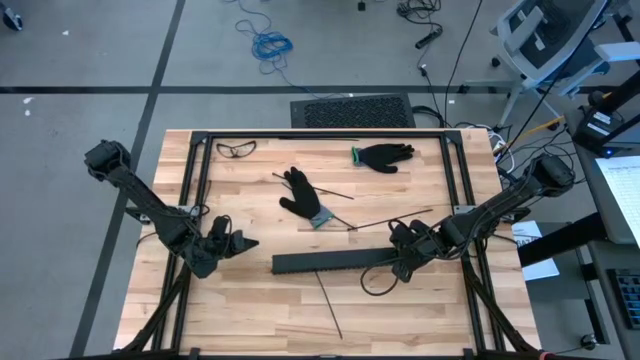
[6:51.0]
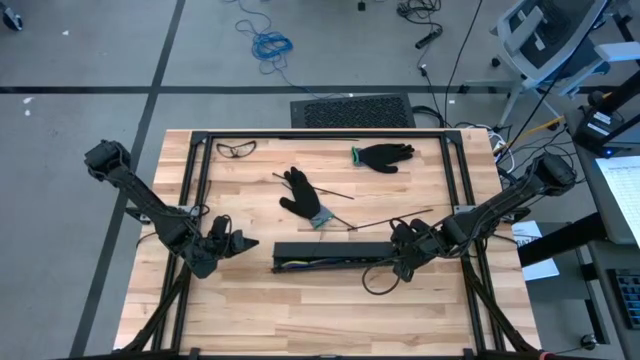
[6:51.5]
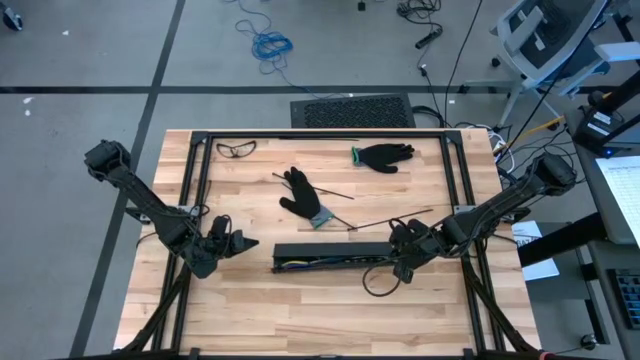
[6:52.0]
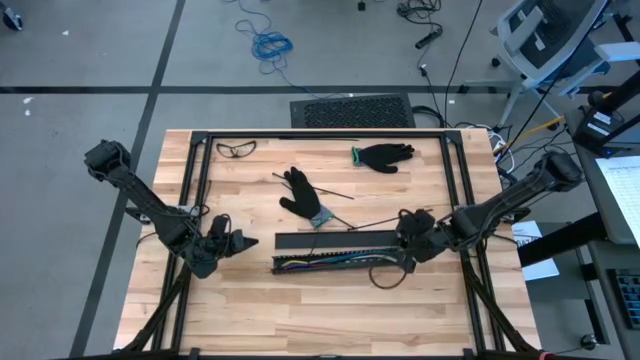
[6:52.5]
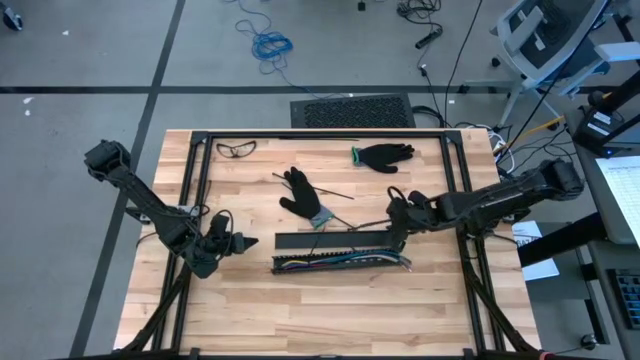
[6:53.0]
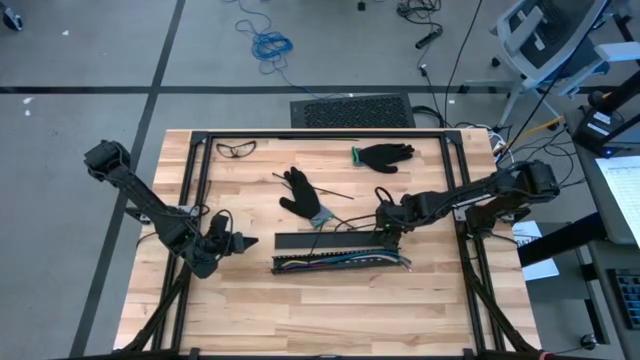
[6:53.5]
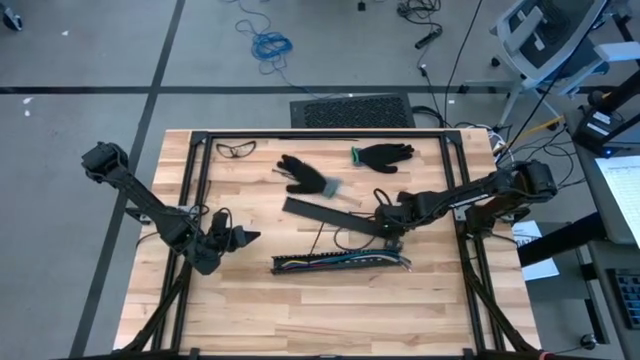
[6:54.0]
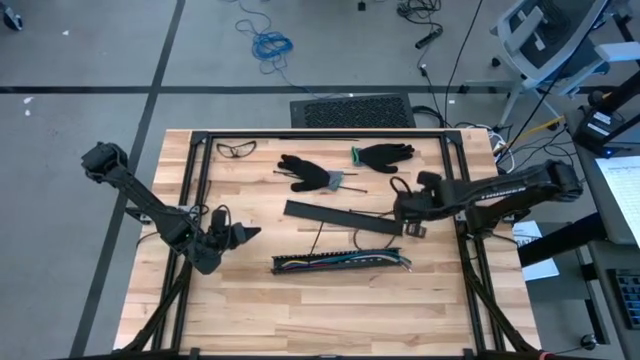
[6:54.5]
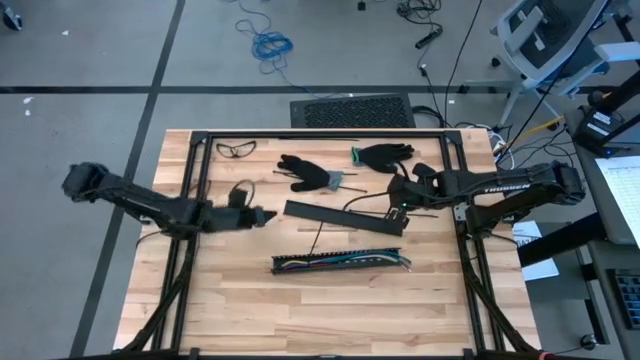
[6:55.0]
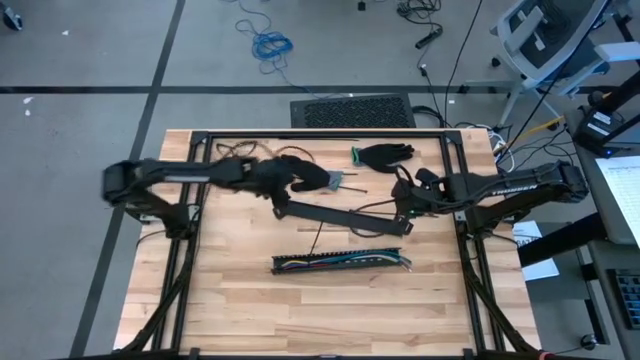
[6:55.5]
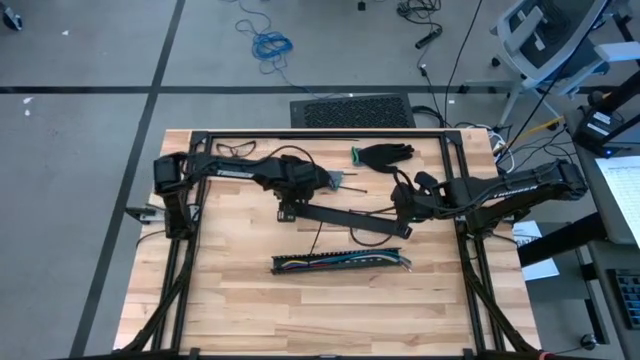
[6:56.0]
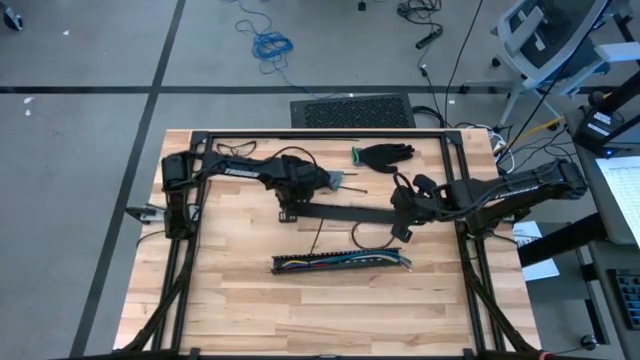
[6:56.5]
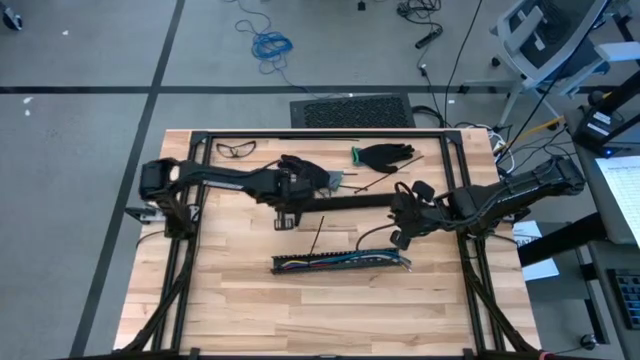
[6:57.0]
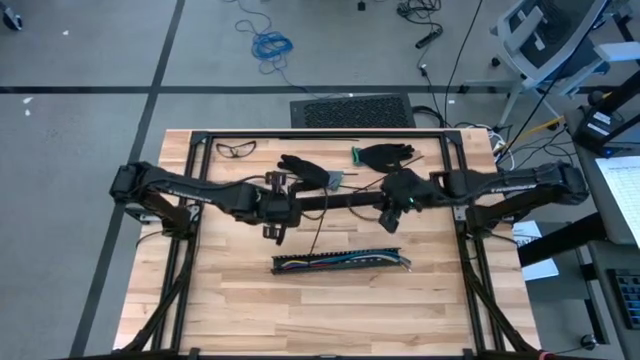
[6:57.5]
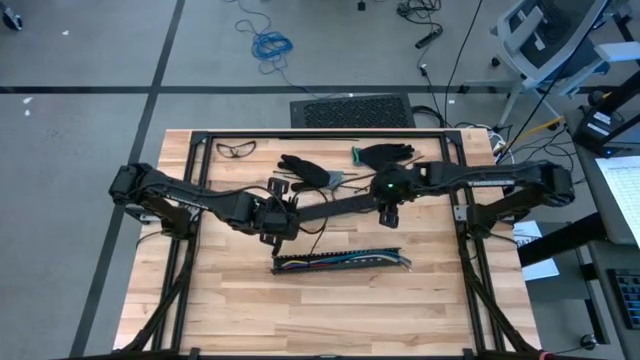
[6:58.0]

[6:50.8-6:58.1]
Task: Ziptie cables
Insert the black cover of the black cable duct

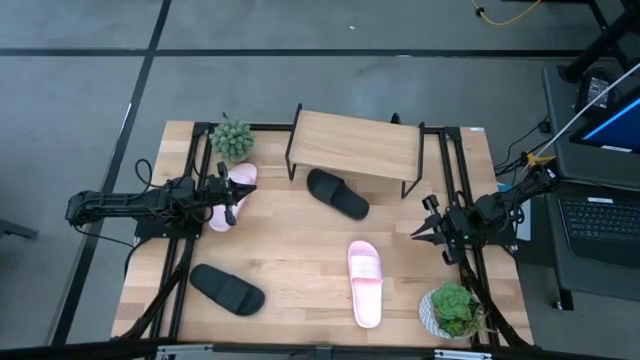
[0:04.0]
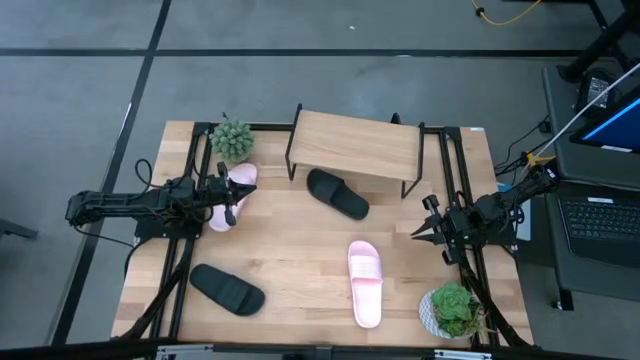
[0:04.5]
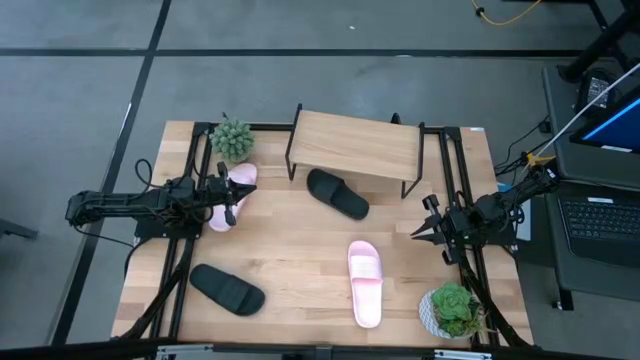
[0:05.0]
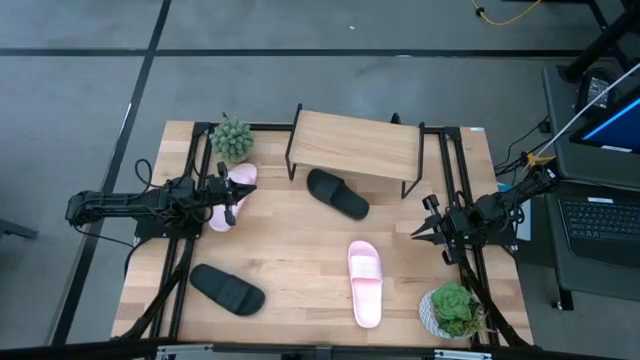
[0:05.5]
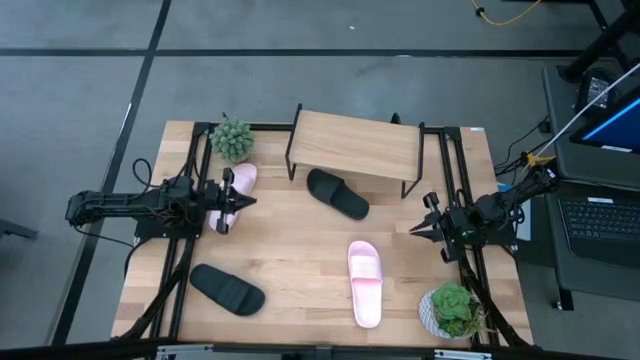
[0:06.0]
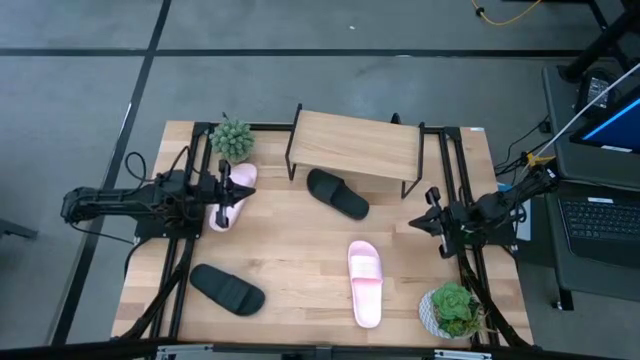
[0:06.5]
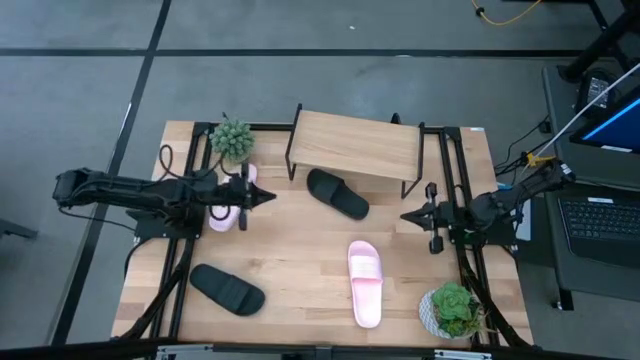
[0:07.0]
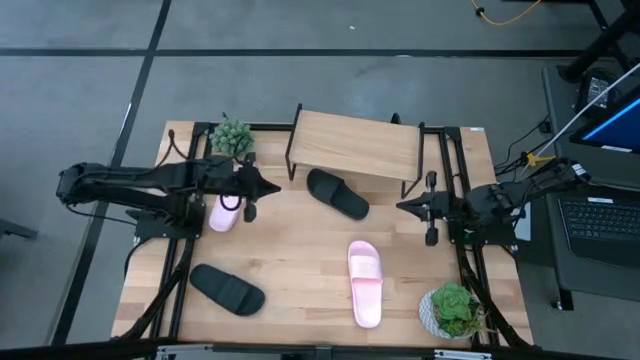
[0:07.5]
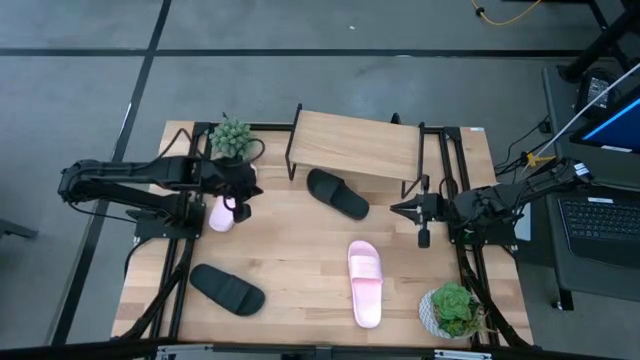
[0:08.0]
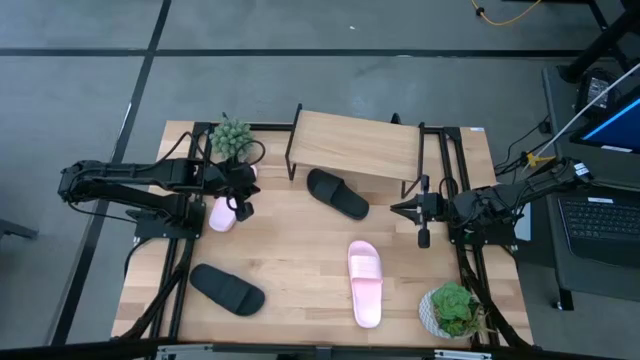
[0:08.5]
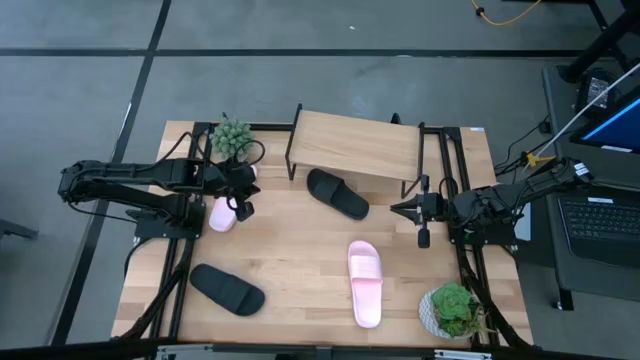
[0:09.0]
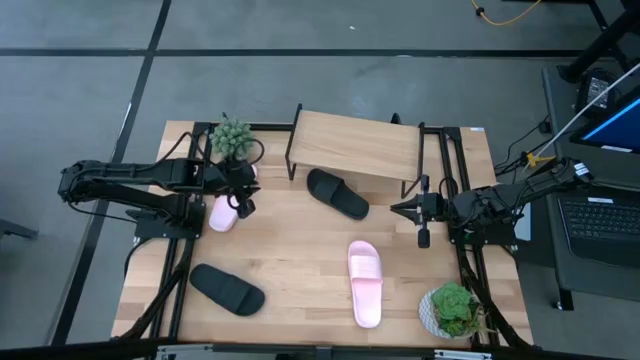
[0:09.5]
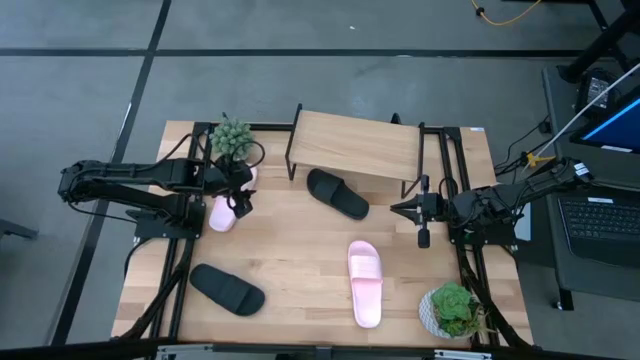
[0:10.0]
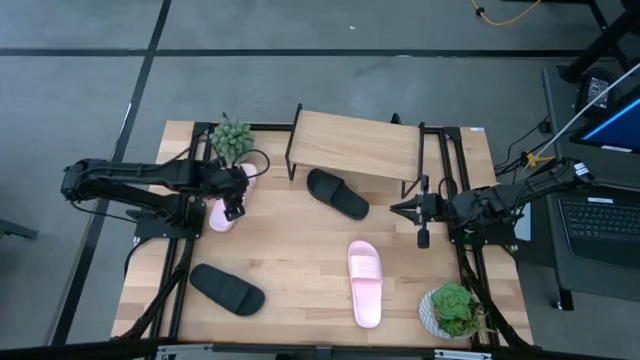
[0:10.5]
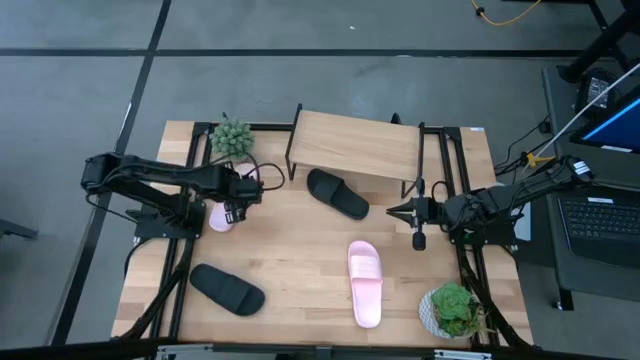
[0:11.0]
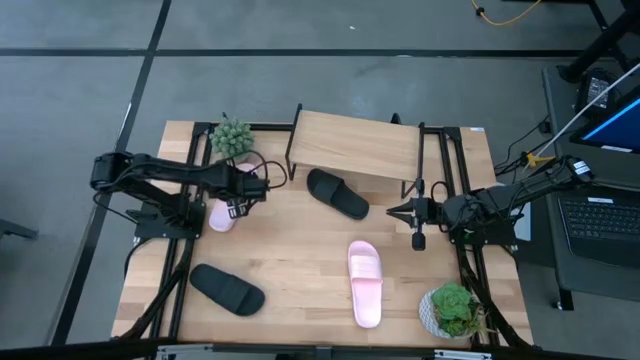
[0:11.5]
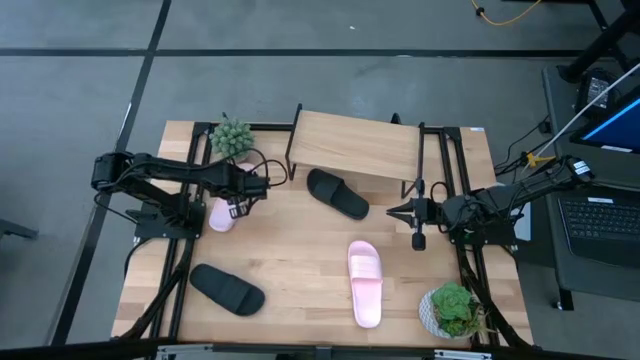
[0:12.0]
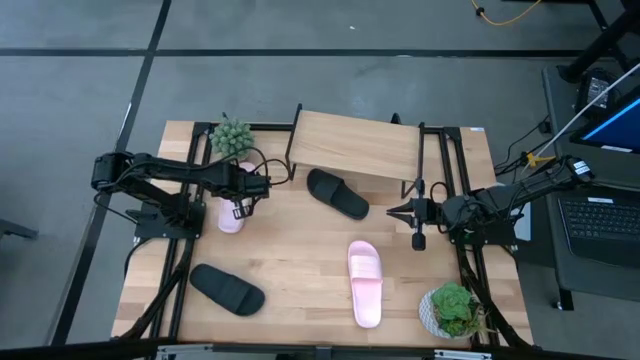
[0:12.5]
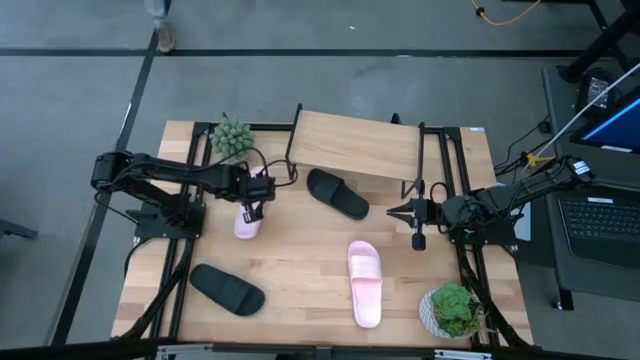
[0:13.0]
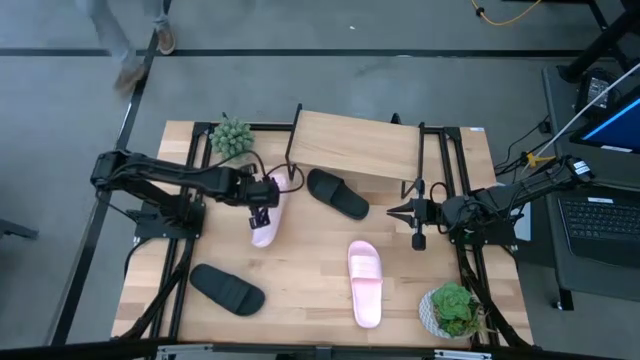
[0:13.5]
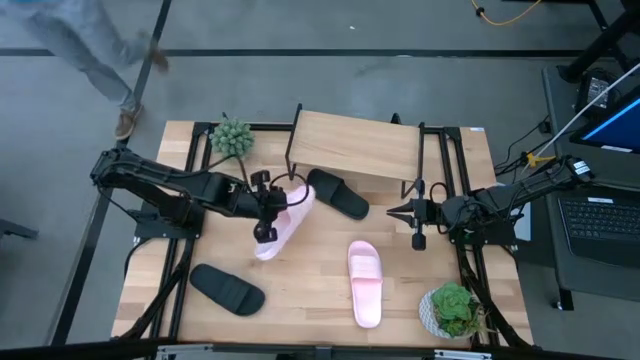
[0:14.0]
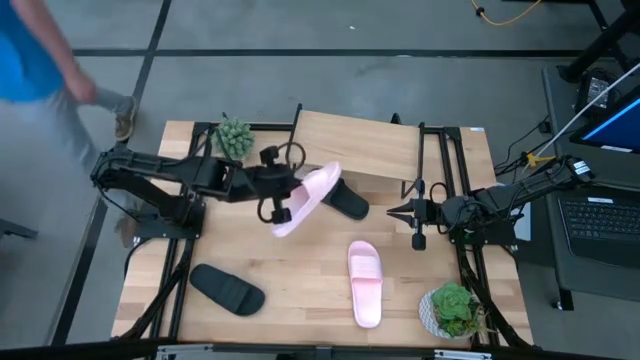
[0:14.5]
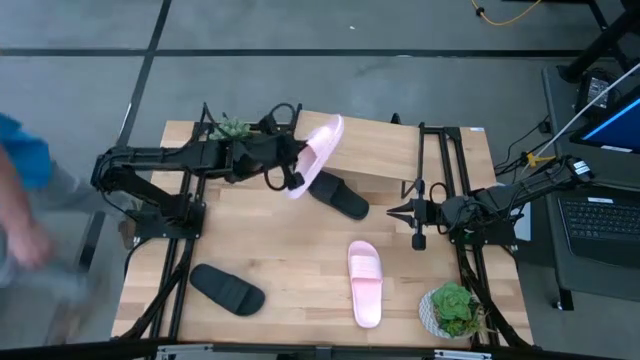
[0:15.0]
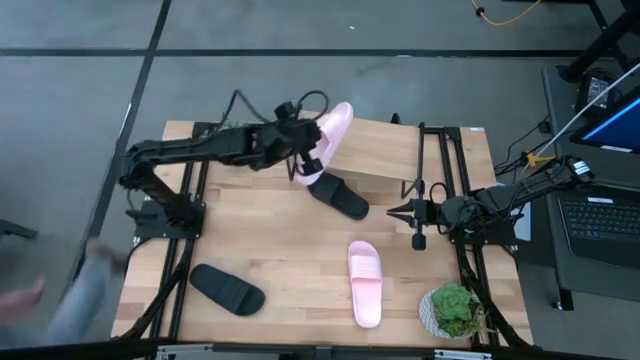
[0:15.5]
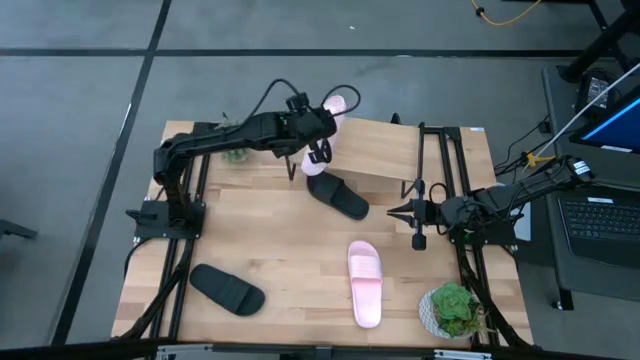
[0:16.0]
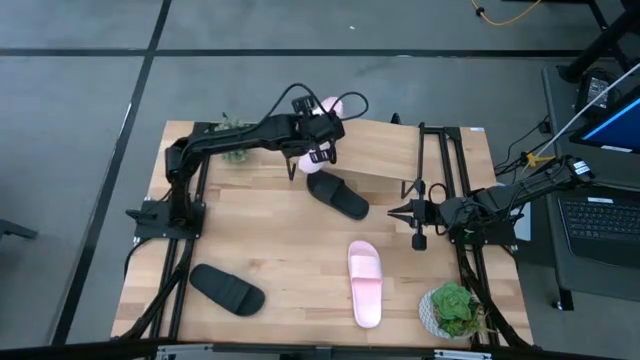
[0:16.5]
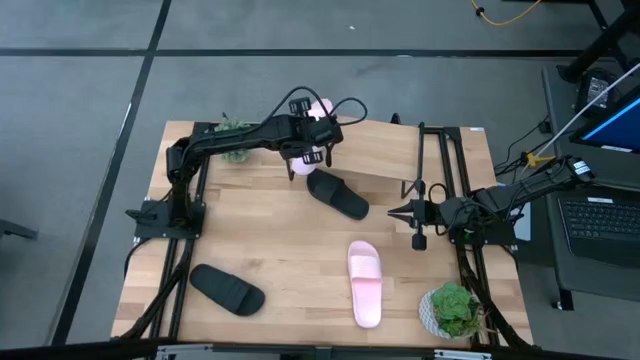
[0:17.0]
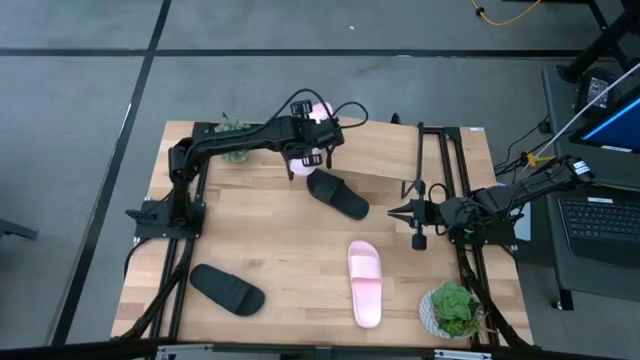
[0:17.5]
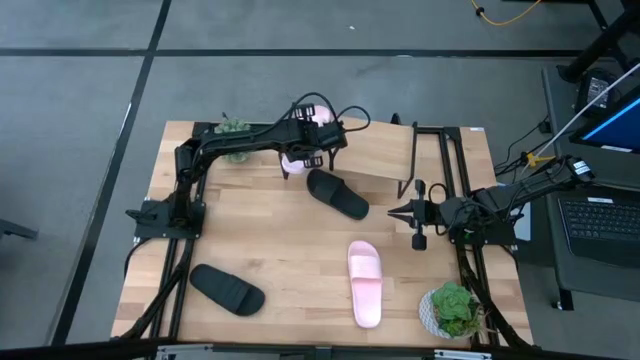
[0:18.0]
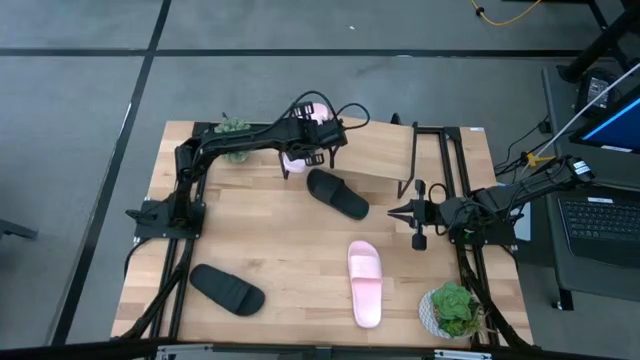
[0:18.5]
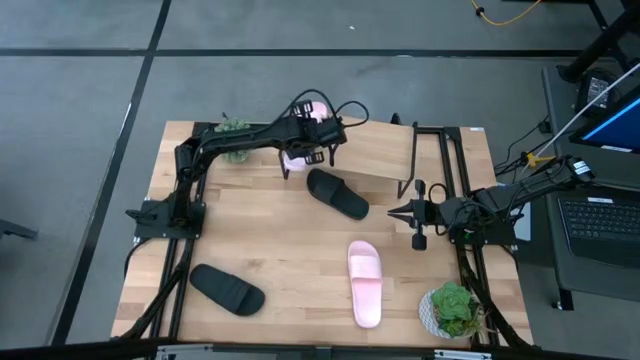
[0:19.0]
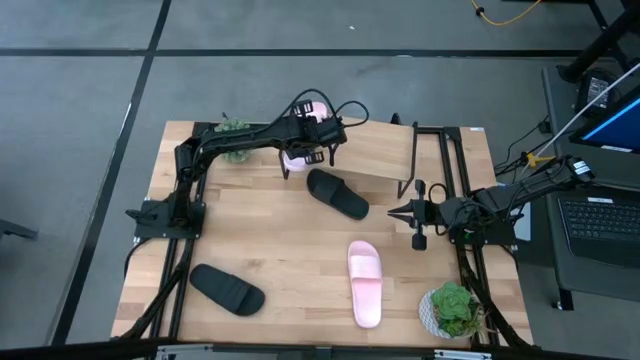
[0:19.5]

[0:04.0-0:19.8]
Task: Pick and place slides into the shelf
Put the top pink slipper on the shelf
